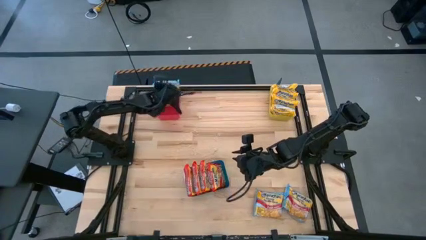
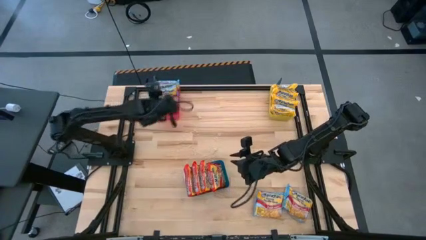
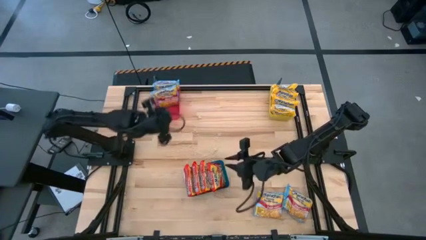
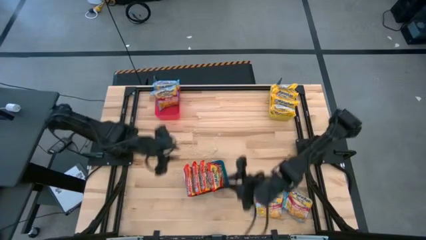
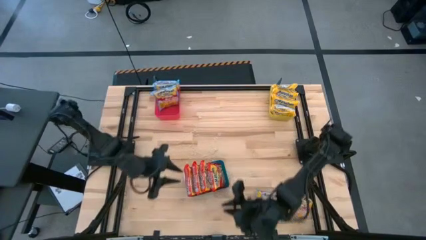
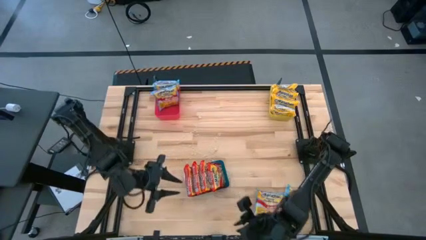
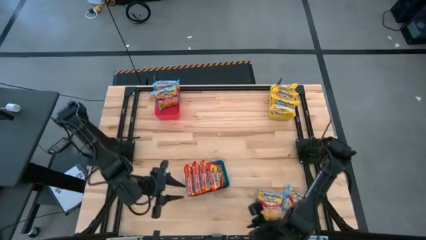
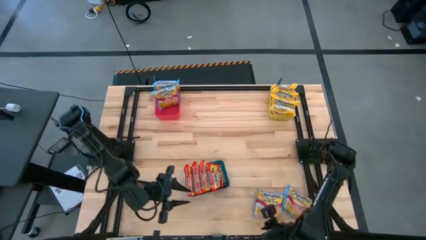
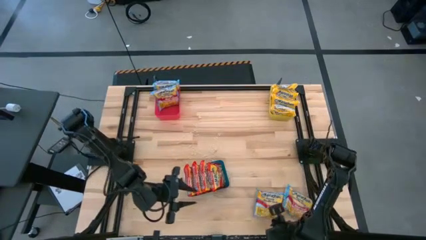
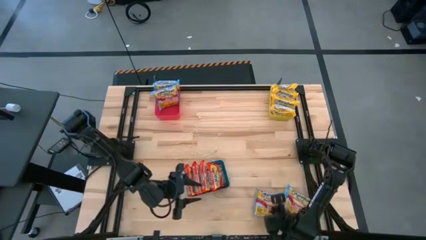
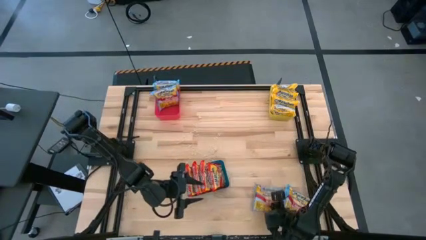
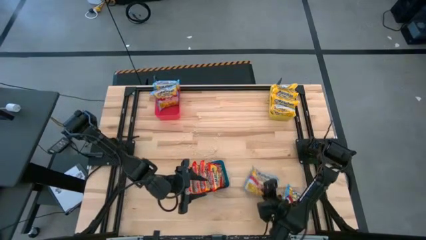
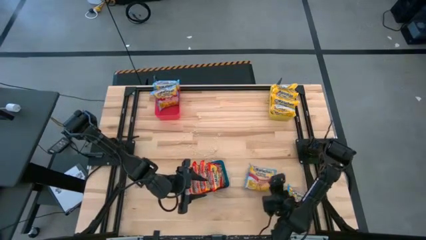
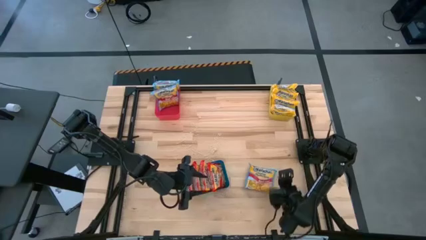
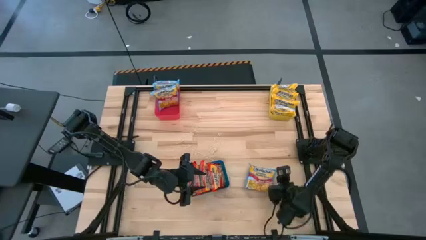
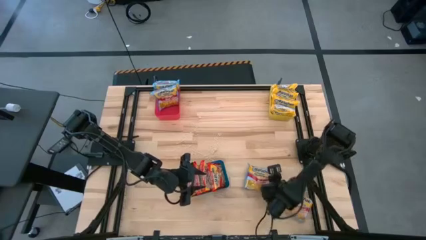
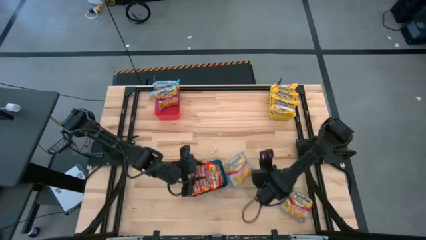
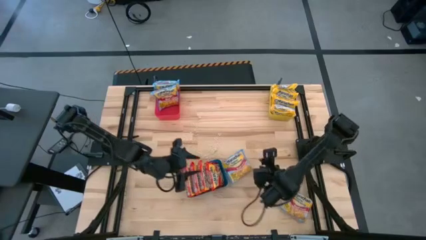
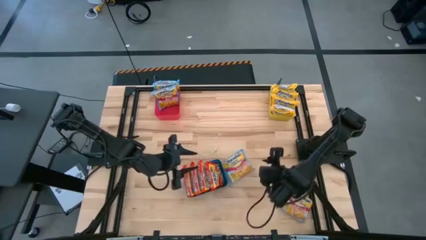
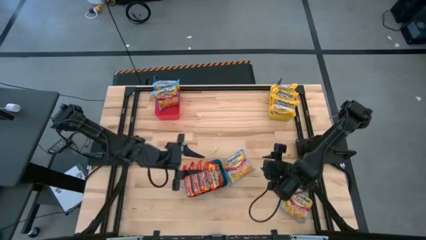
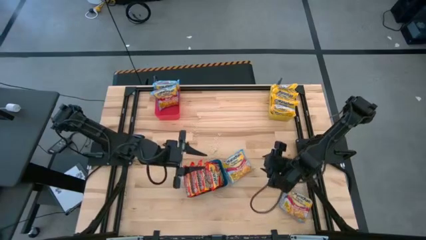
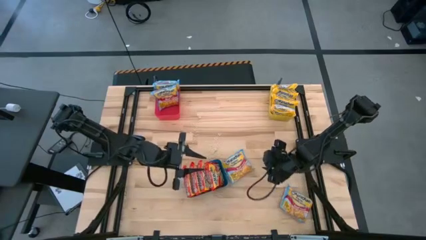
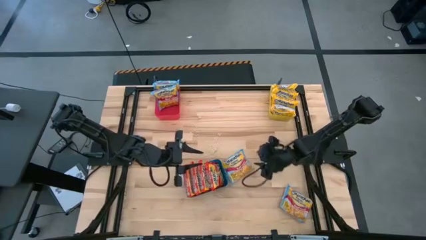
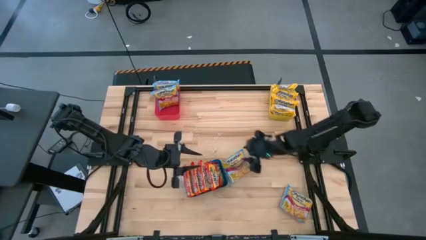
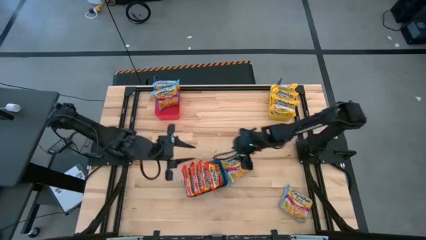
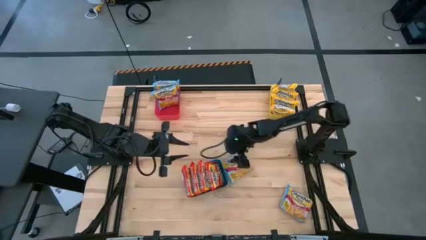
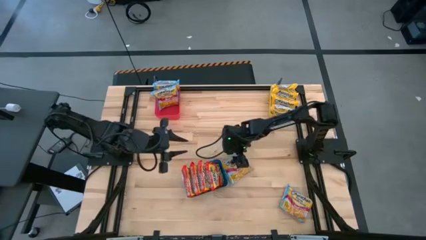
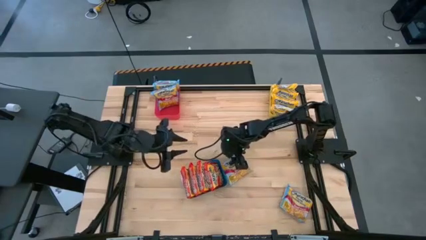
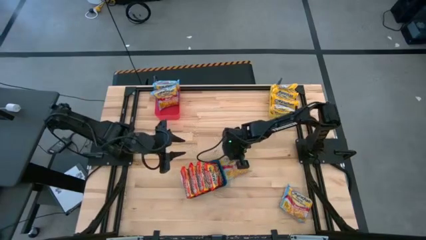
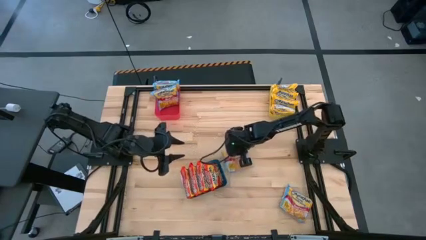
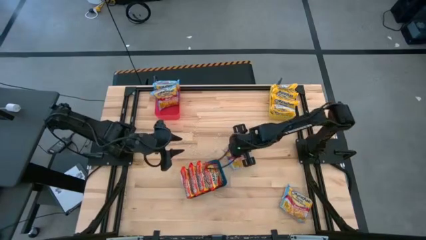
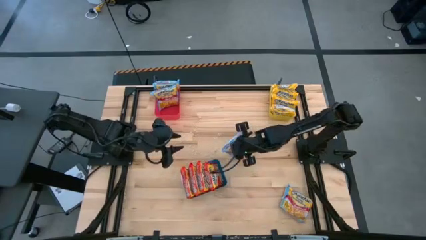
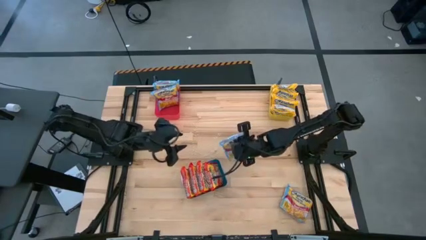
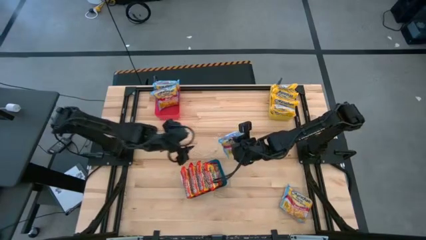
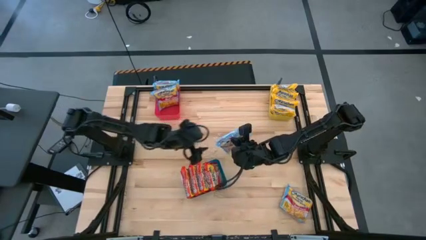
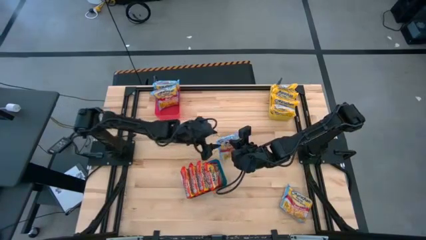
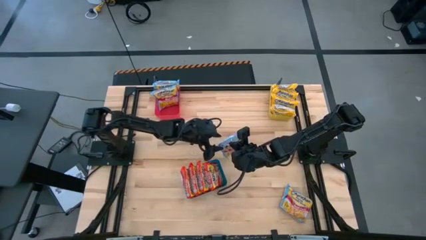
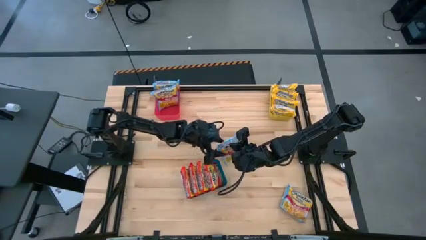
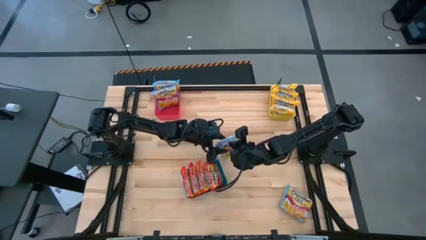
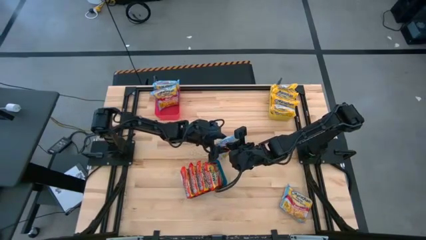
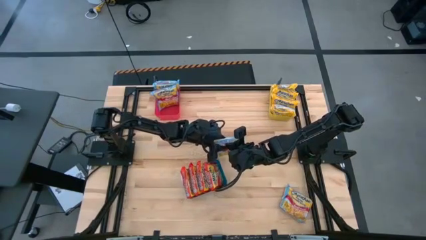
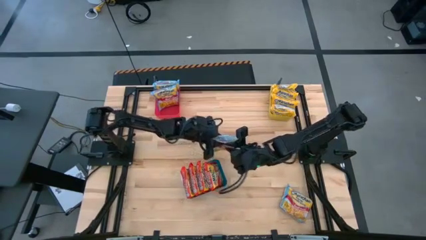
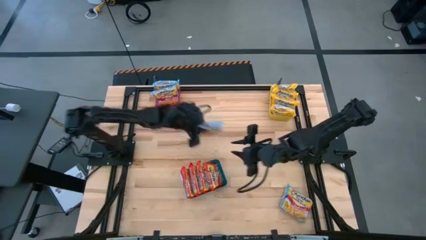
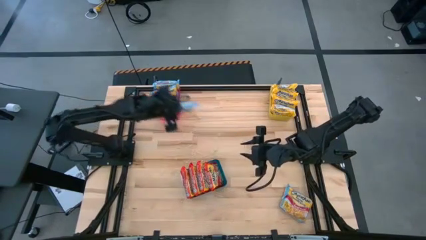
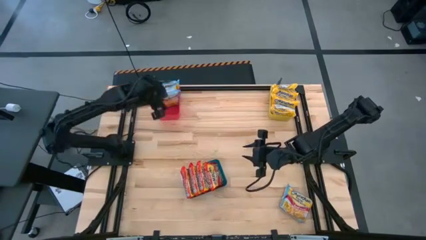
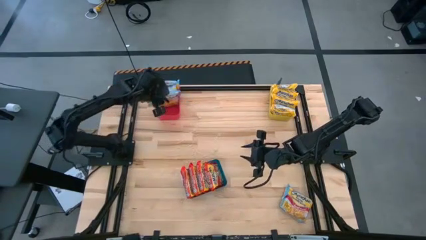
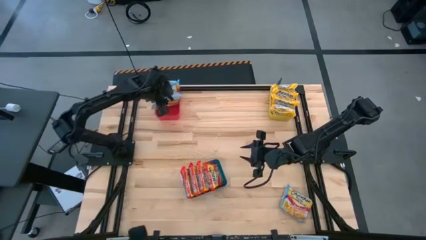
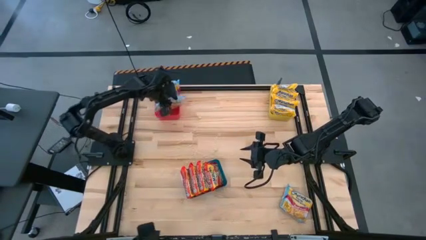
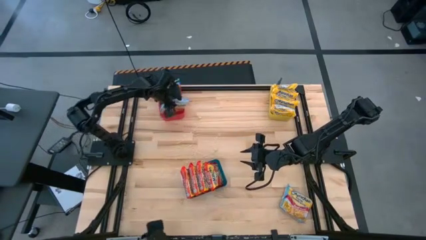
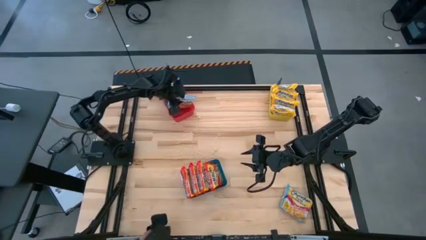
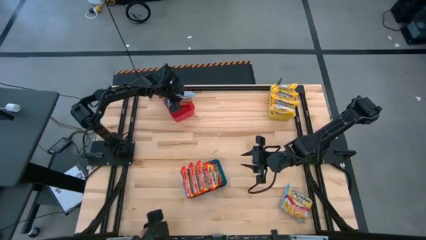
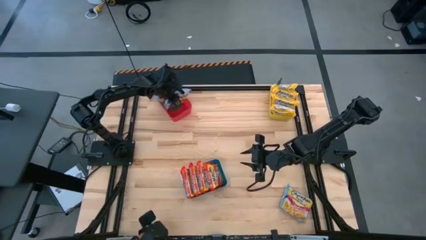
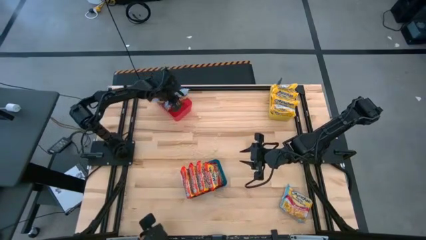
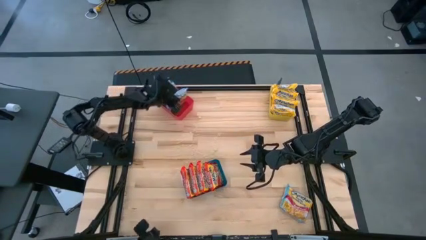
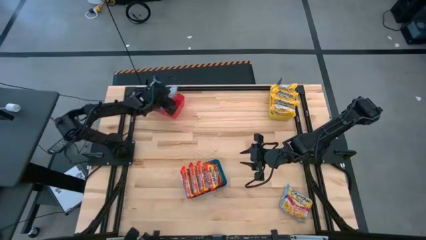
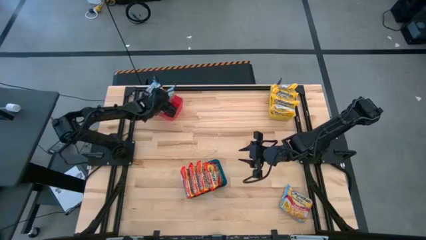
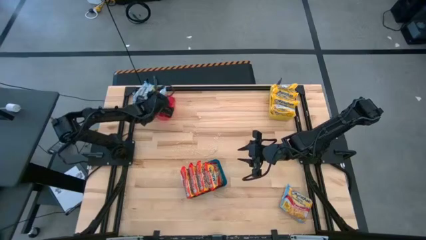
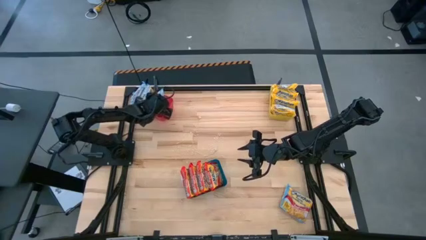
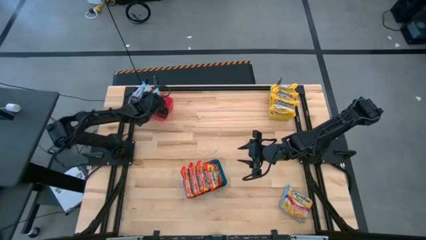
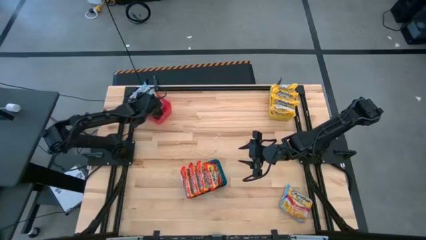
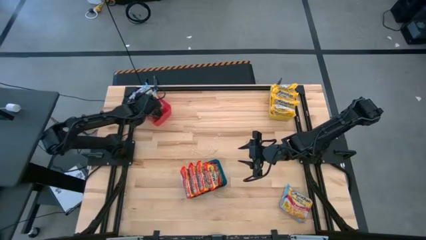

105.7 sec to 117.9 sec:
Task: Sort Maruchan noodles
Put the left blue noodle pack into the red bin

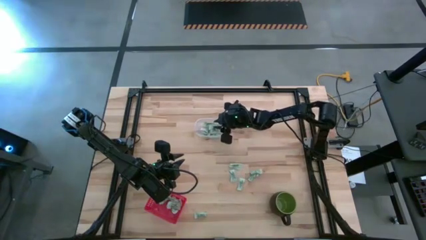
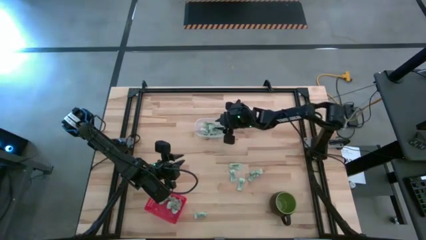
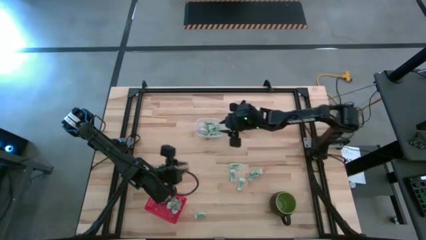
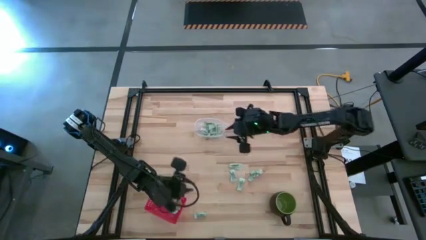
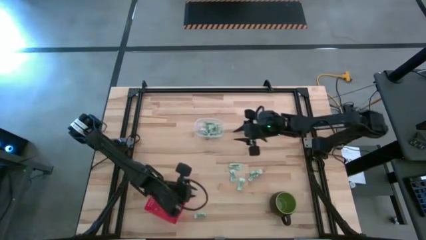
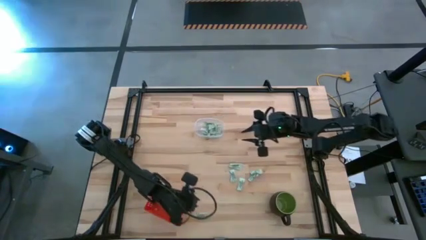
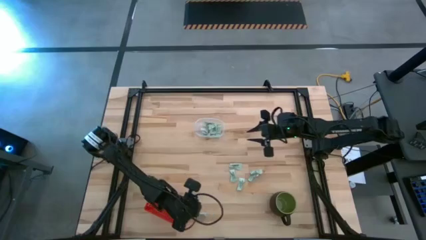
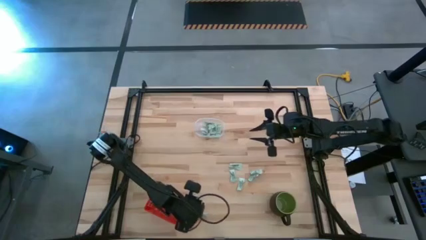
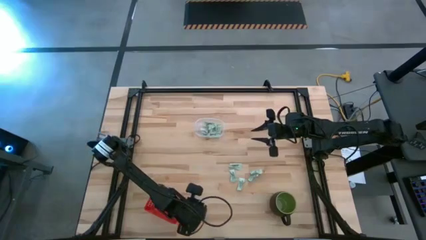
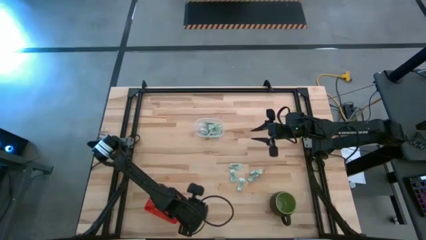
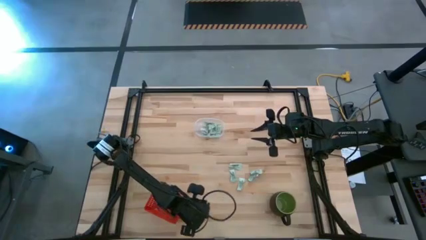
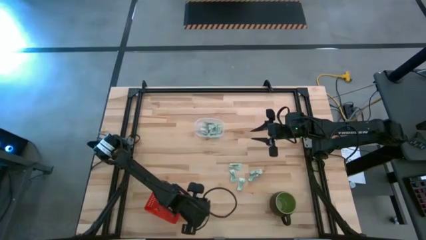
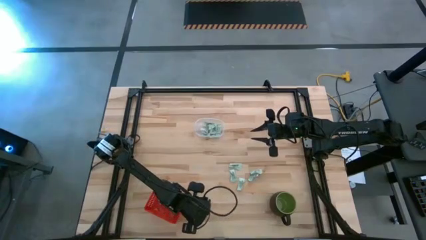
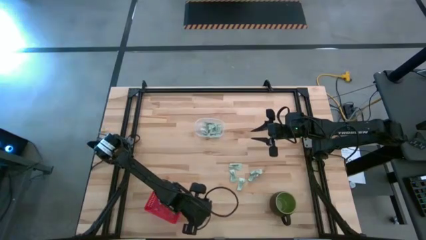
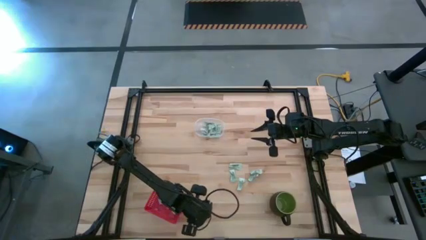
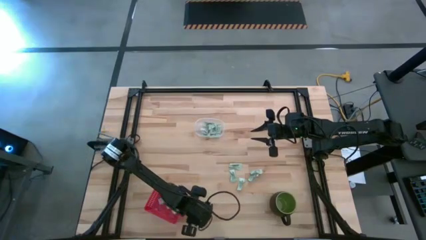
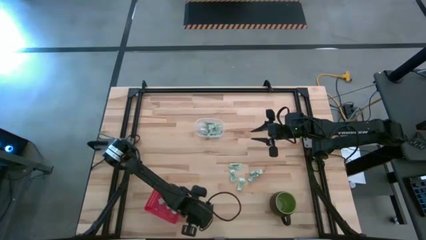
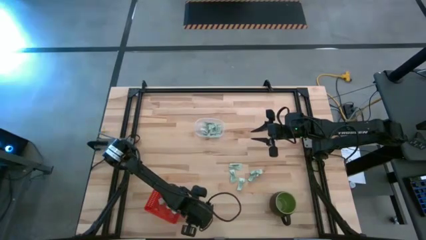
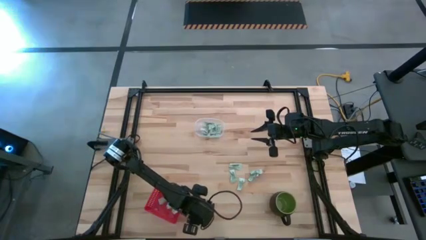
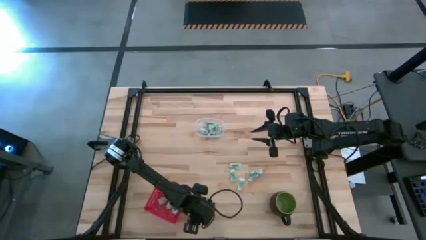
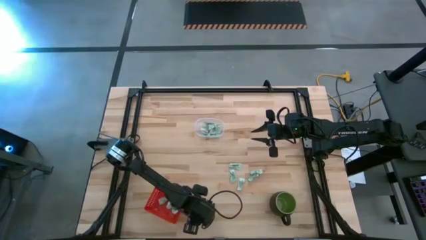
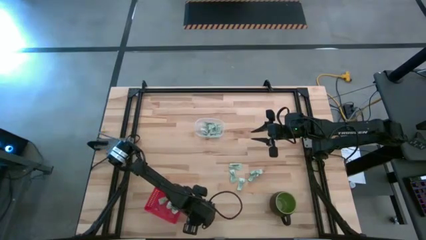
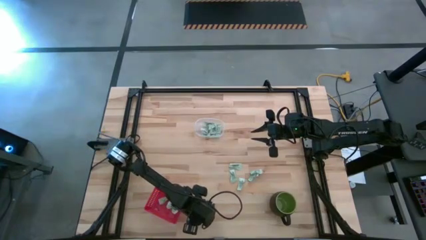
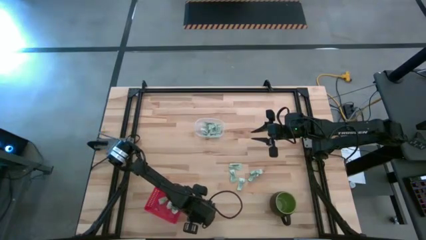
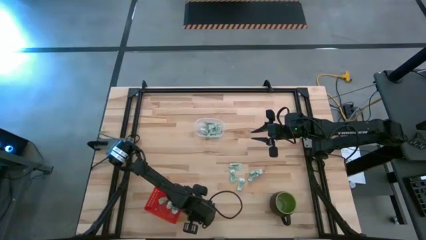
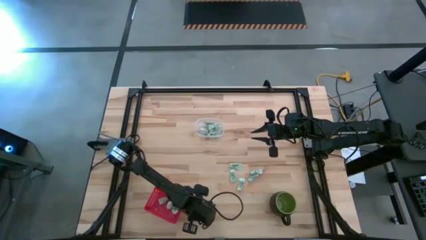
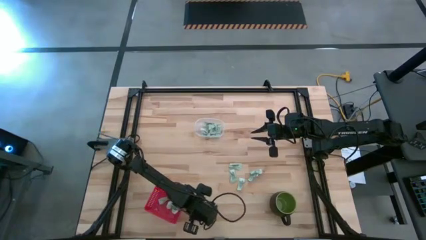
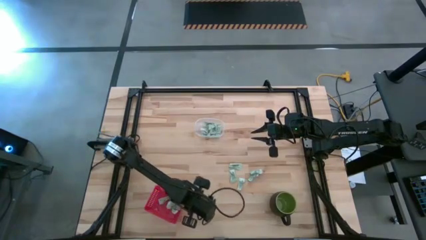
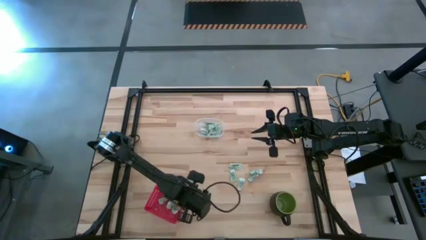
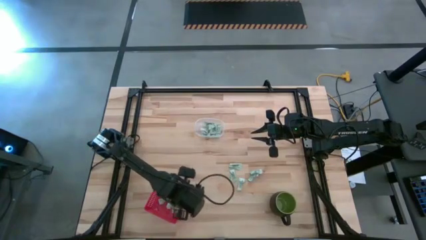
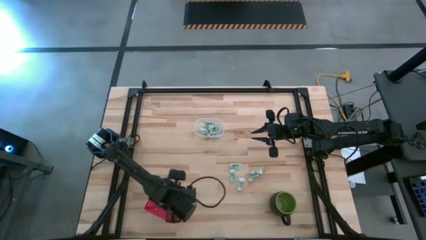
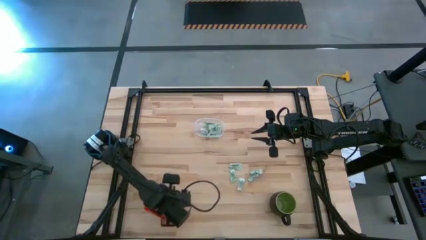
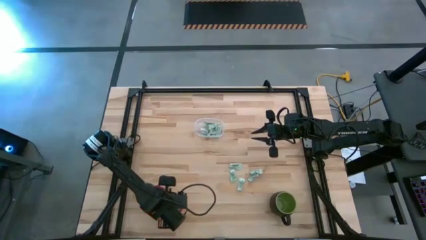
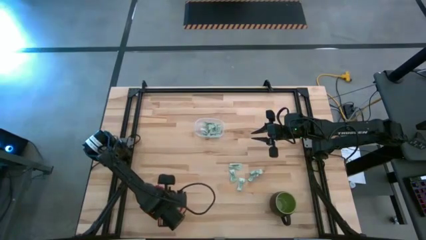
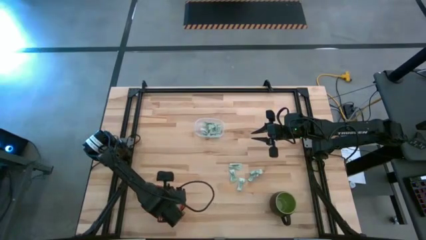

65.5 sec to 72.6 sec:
Task: Pick and place items into bin
Put the stevia packet into the orange bin
